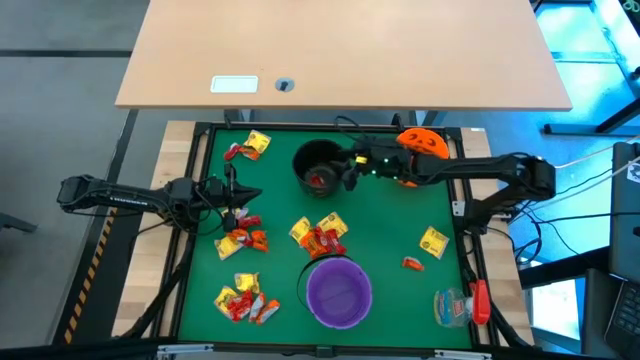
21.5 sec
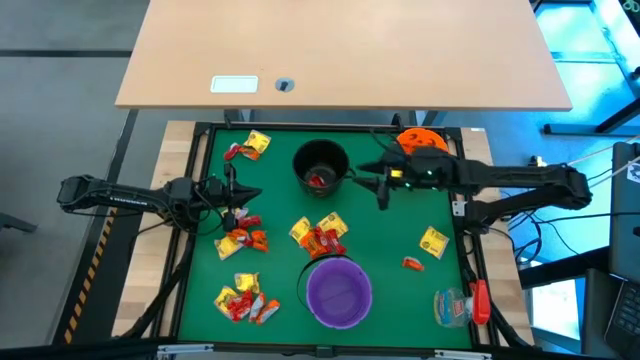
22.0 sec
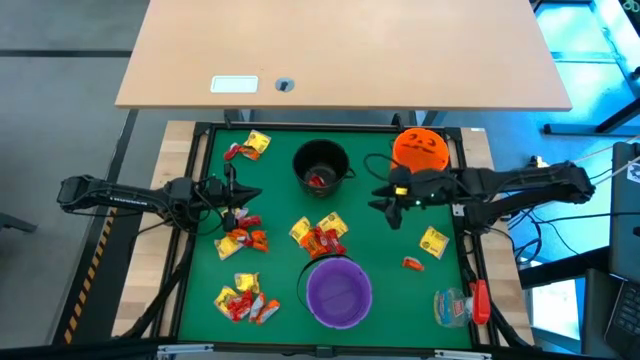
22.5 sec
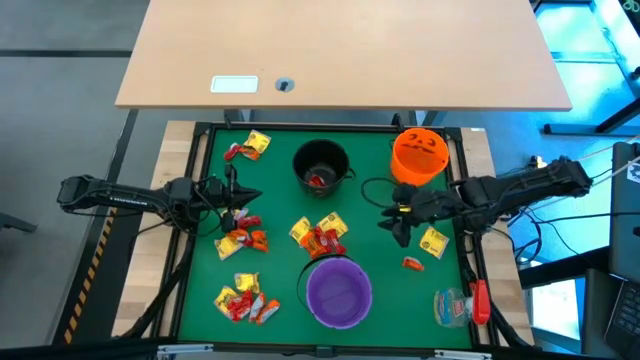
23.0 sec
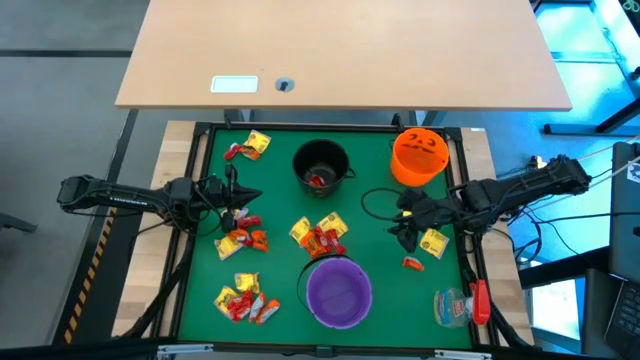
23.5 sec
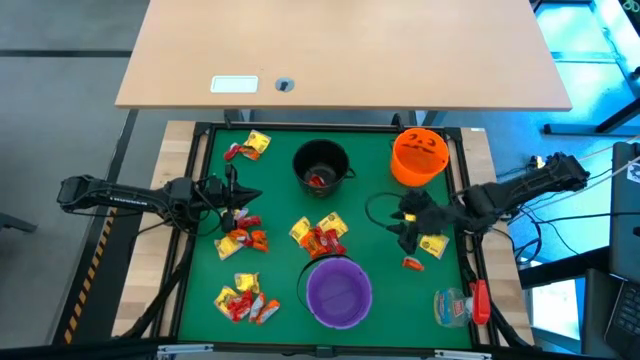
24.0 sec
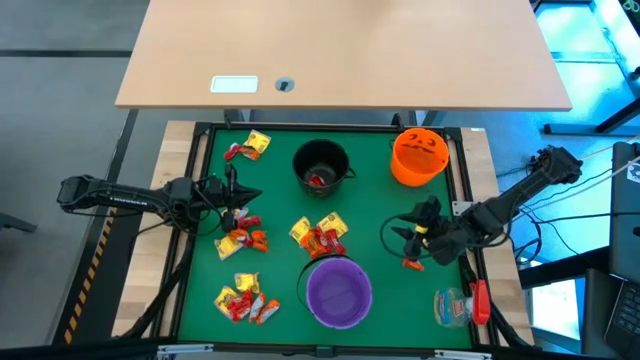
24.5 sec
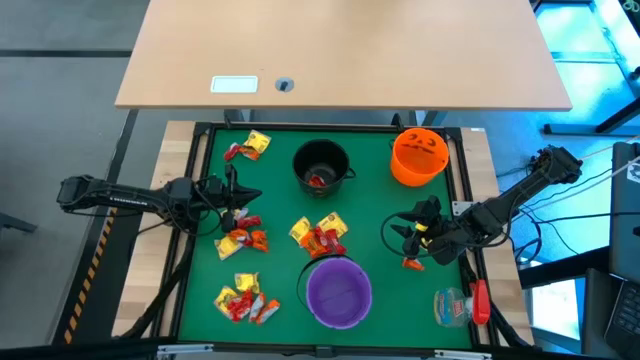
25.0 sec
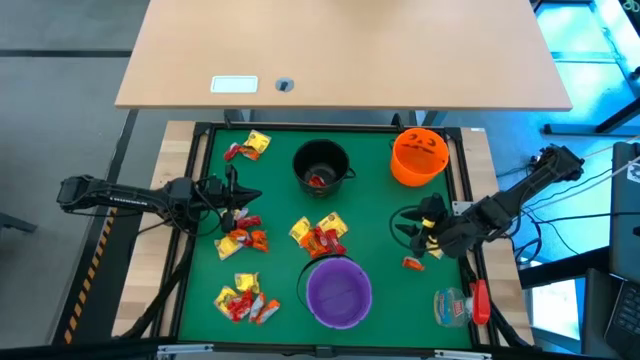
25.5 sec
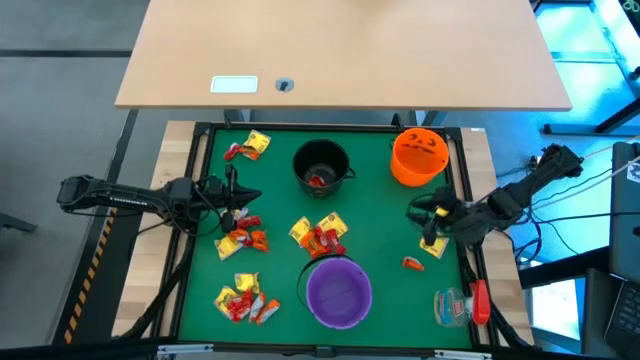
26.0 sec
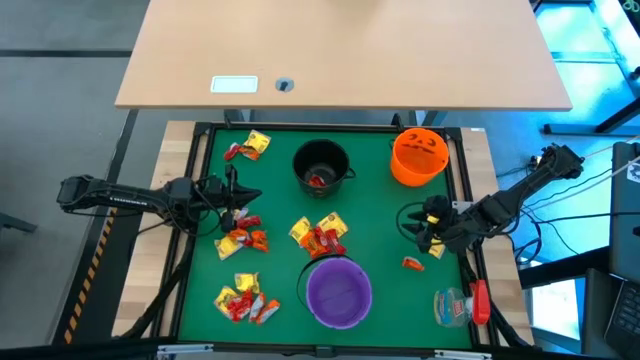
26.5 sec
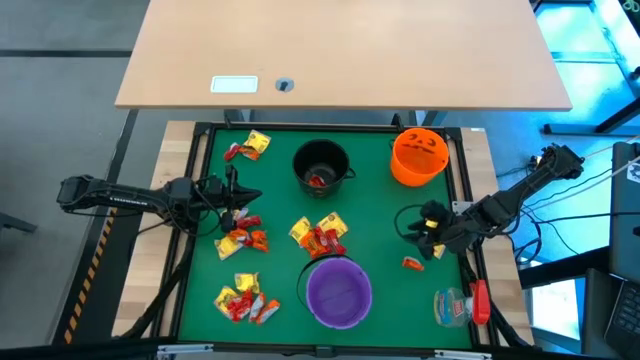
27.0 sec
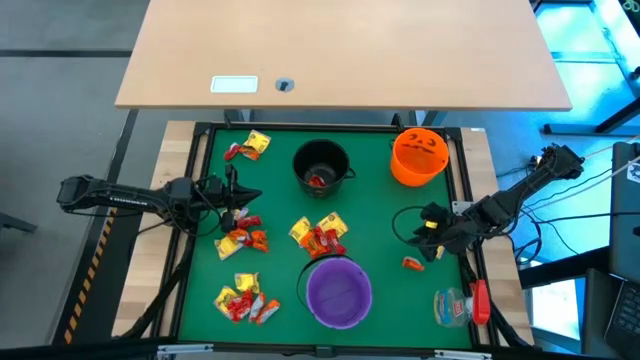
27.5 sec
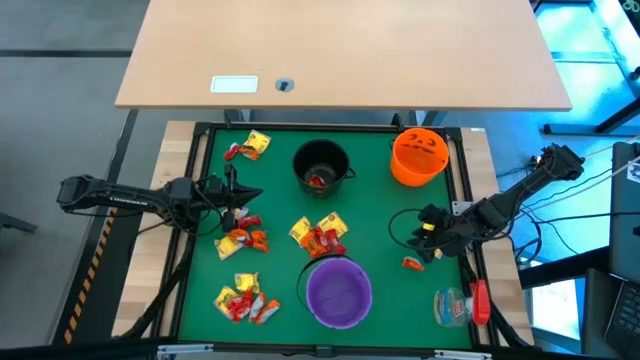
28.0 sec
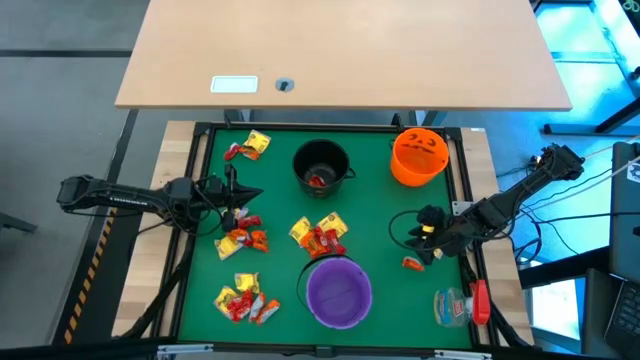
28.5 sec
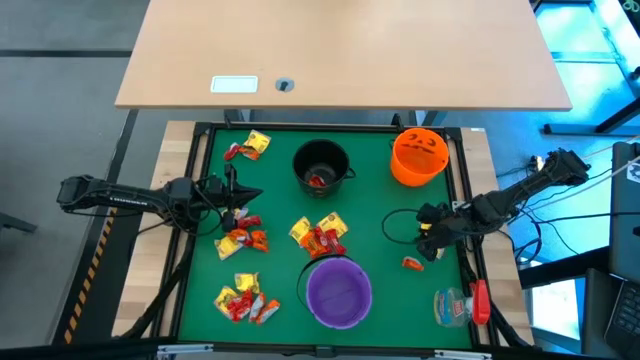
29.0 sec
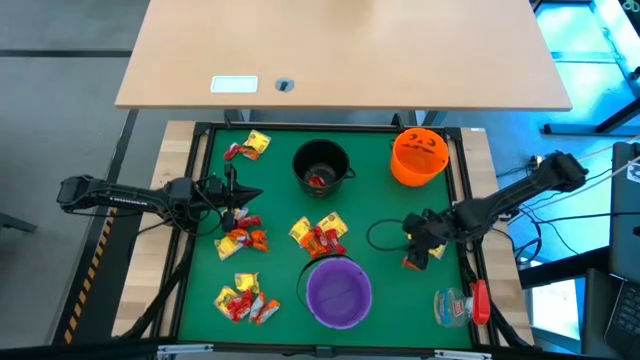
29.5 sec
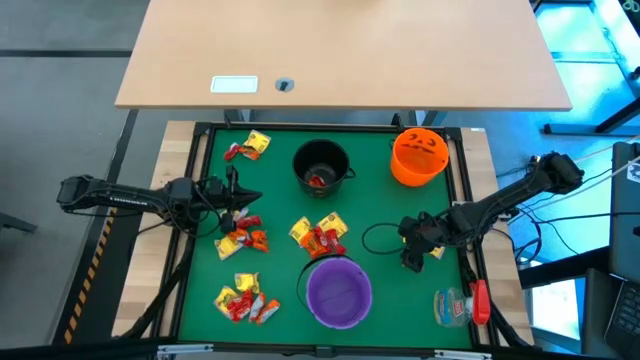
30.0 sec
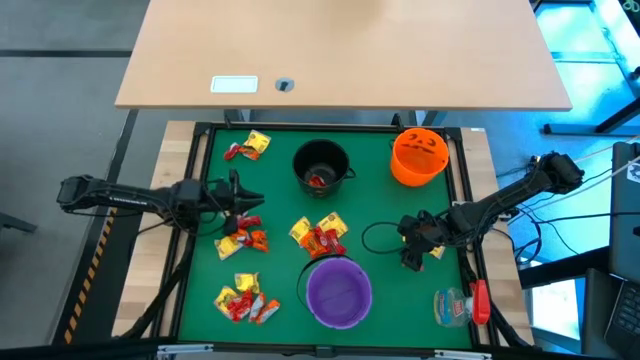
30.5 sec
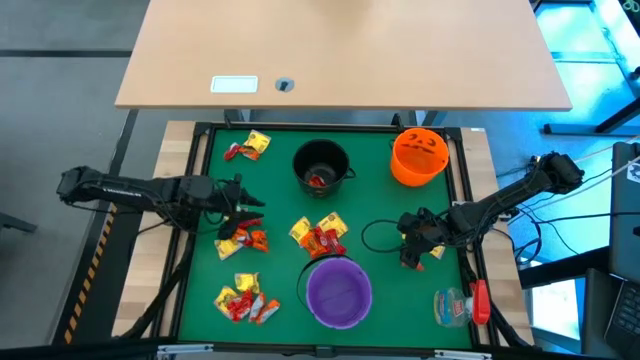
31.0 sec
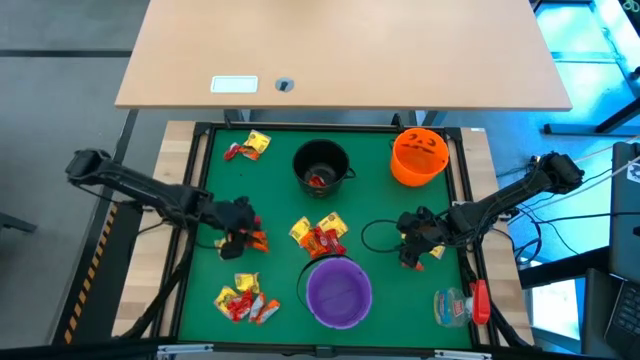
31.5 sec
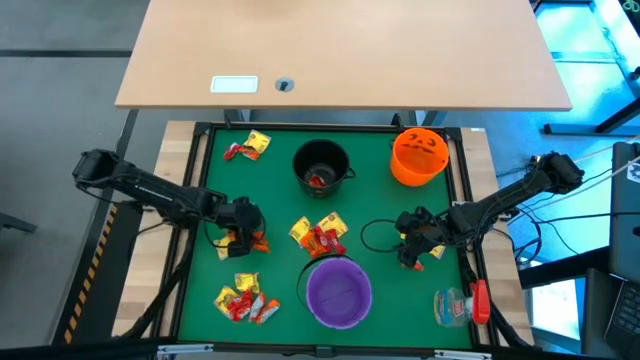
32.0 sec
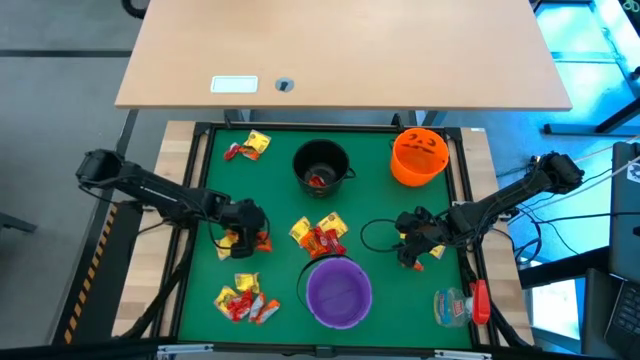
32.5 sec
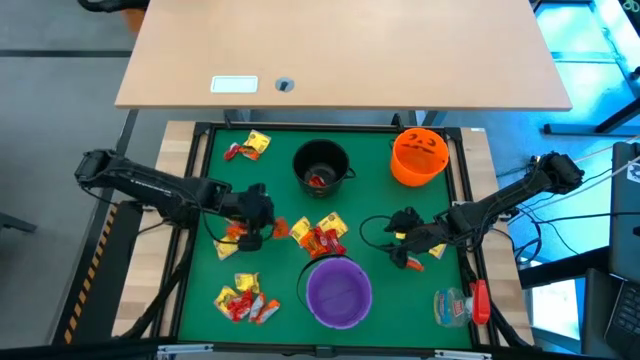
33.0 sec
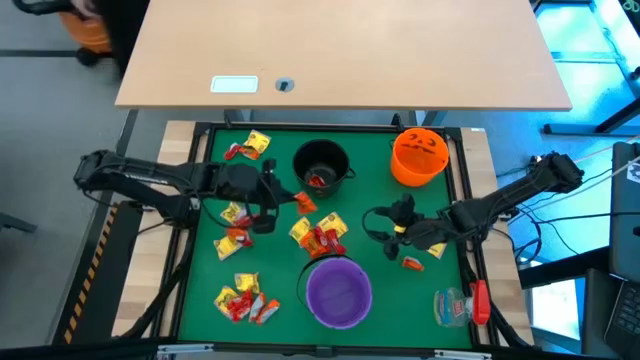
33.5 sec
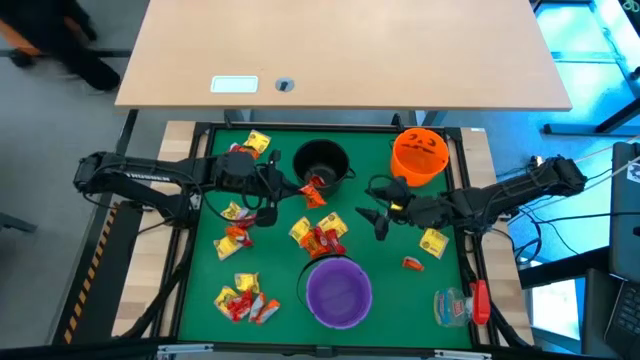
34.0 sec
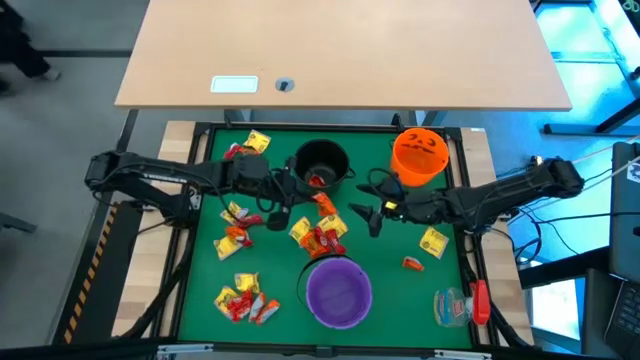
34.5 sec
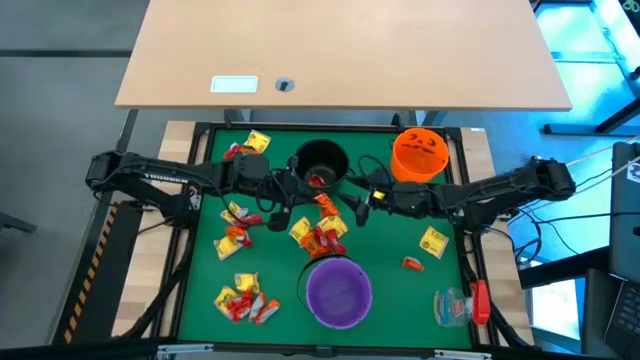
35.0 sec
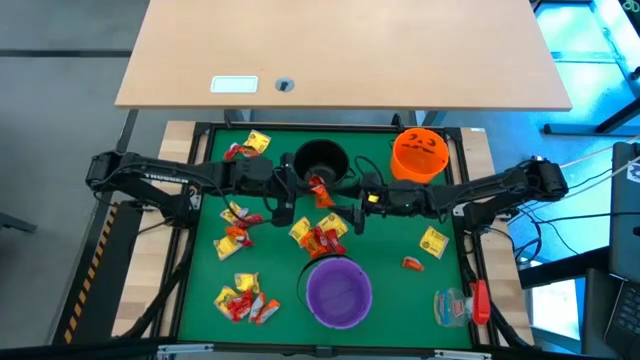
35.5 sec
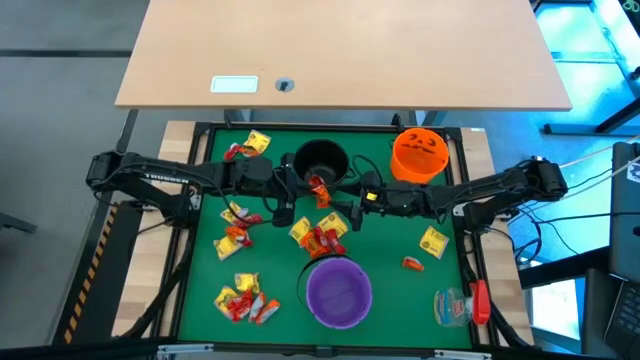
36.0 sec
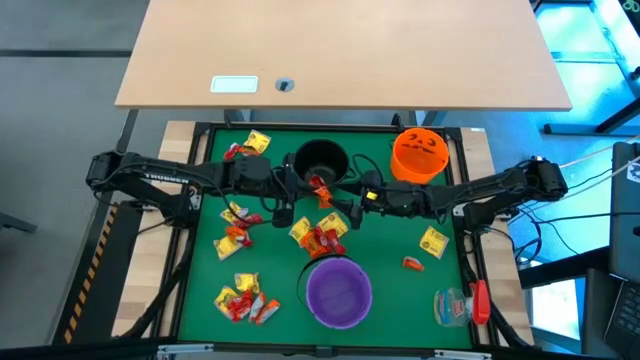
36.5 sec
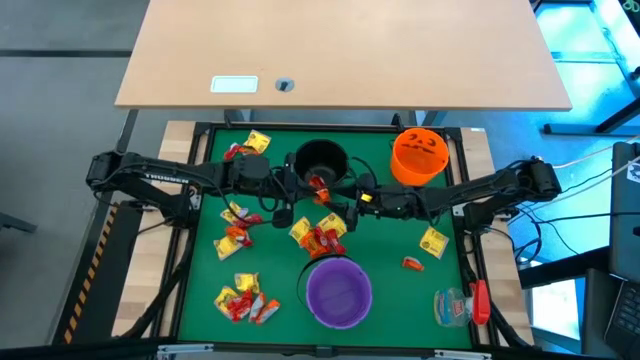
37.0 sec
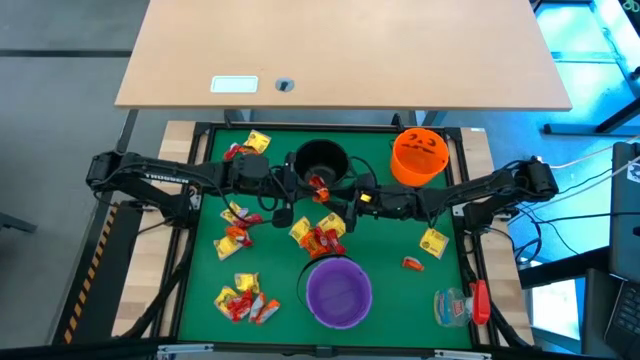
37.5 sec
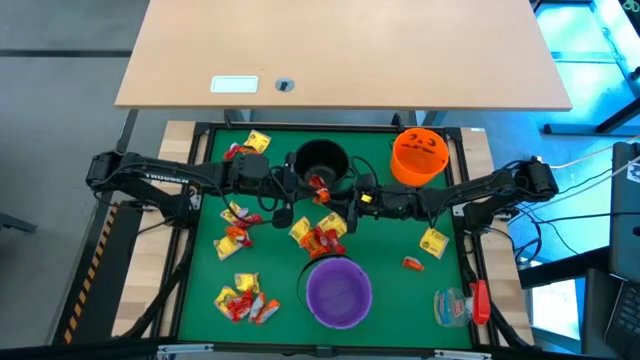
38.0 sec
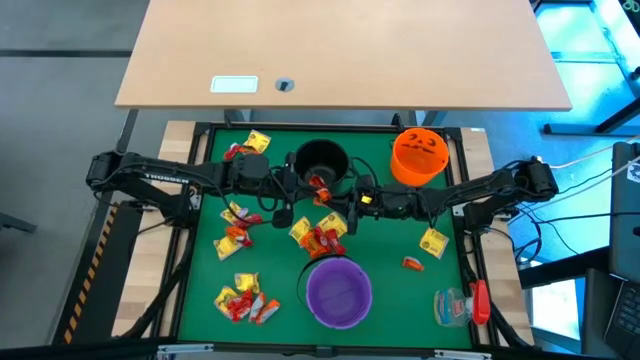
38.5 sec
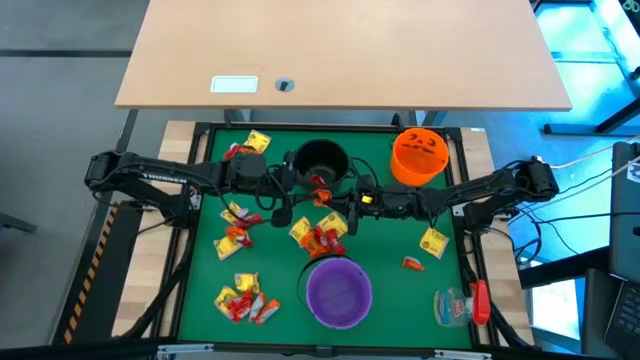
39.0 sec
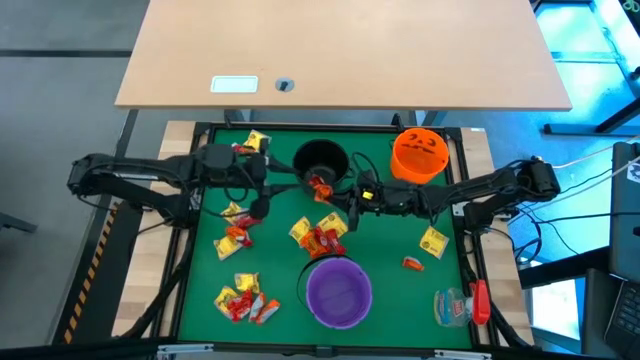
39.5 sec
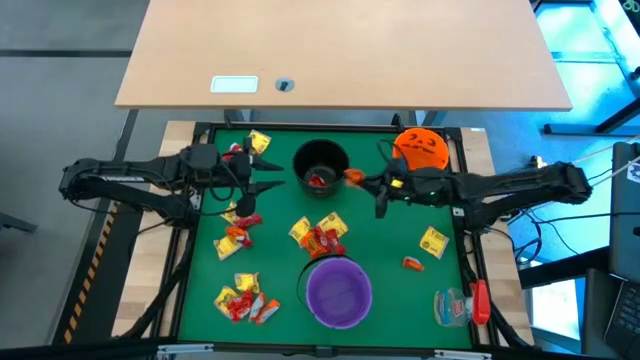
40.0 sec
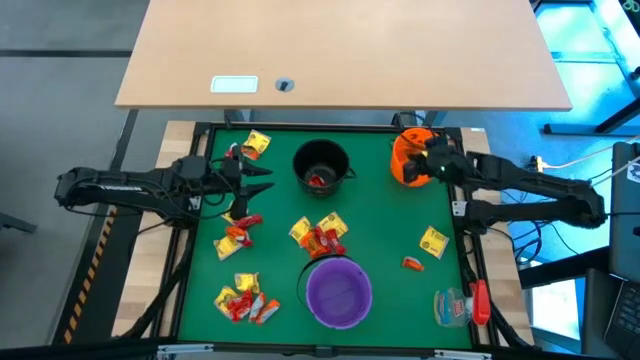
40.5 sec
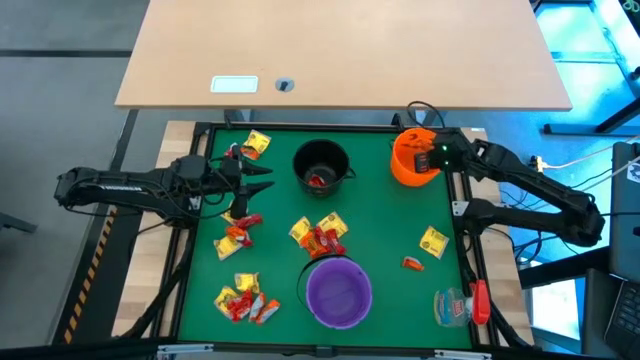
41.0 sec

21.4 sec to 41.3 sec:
Task: Sort candy
Put the orange candy into the orange bucket

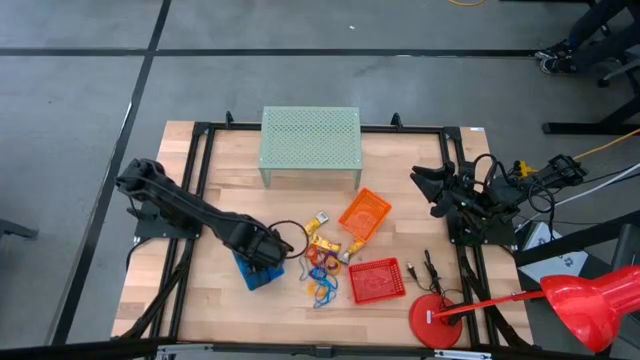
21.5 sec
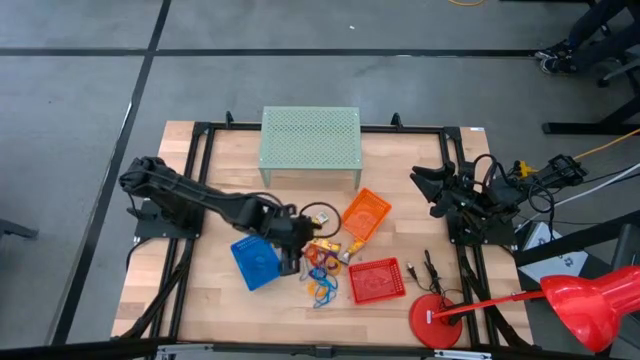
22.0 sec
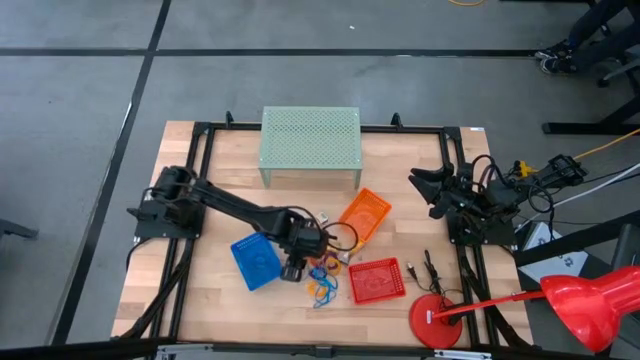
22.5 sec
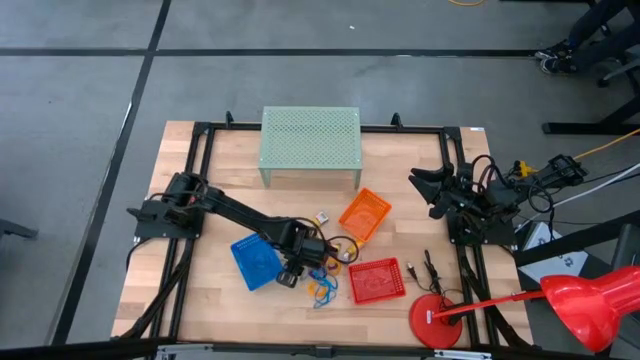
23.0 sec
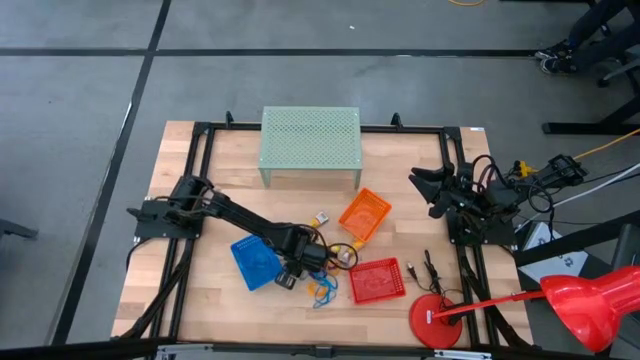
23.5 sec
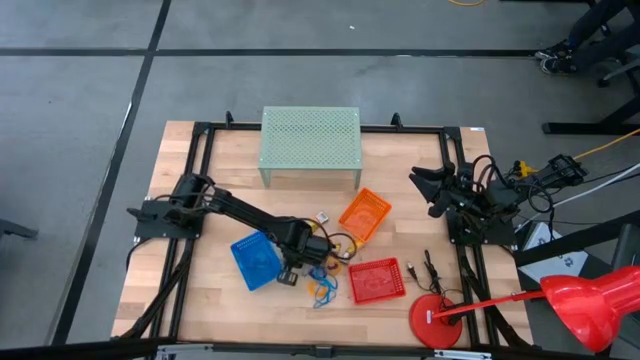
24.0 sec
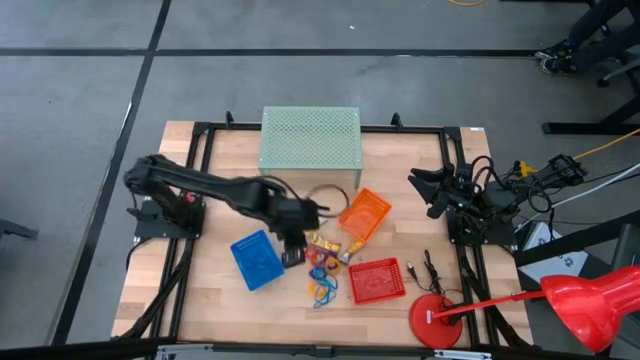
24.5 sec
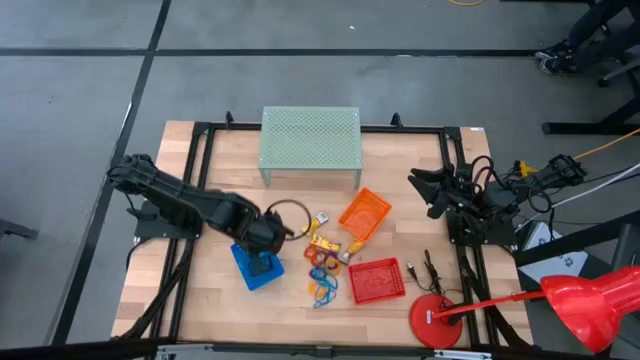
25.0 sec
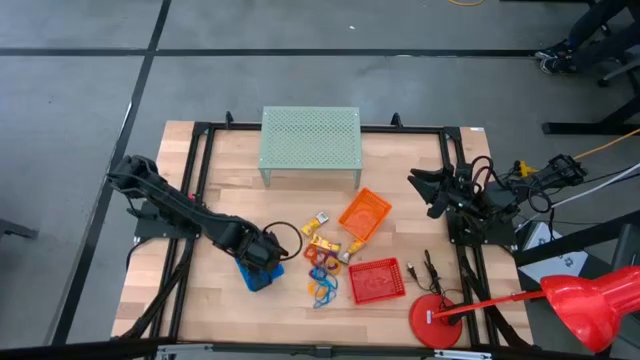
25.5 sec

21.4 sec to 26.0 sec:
Task: Pick & Place Office Desk Supplies
Put the blue rubberband into the blue bin
